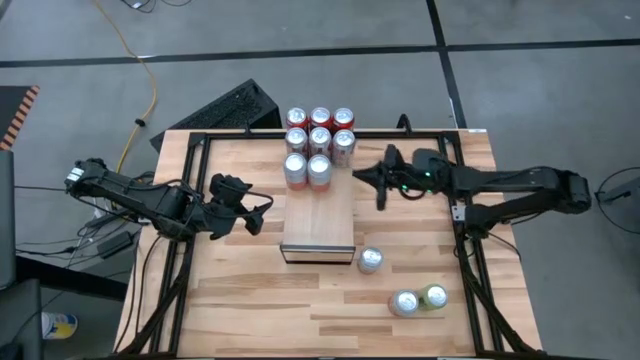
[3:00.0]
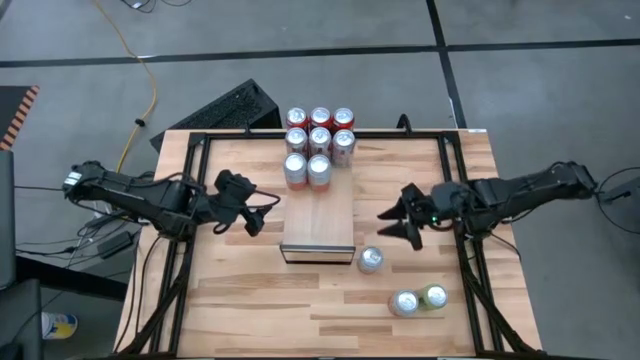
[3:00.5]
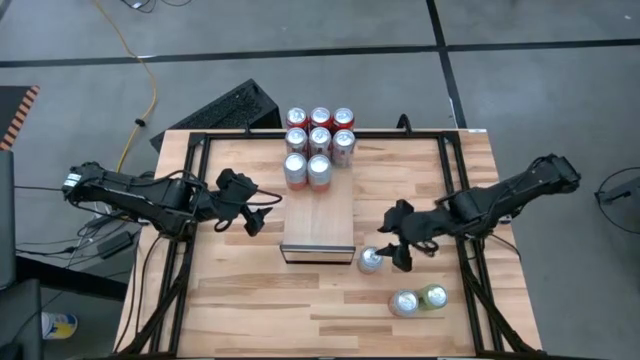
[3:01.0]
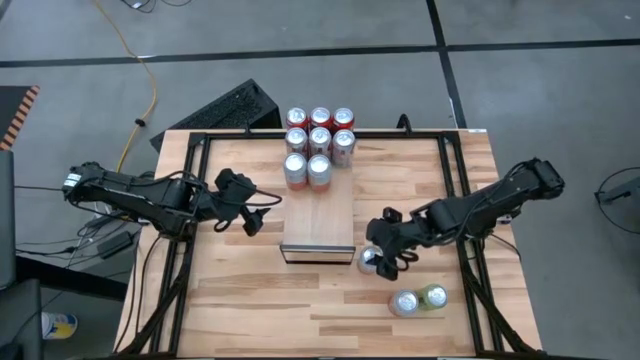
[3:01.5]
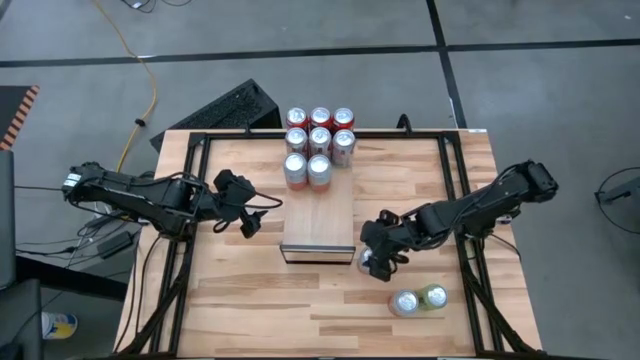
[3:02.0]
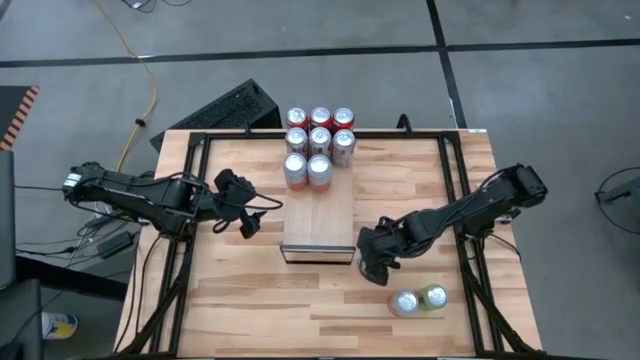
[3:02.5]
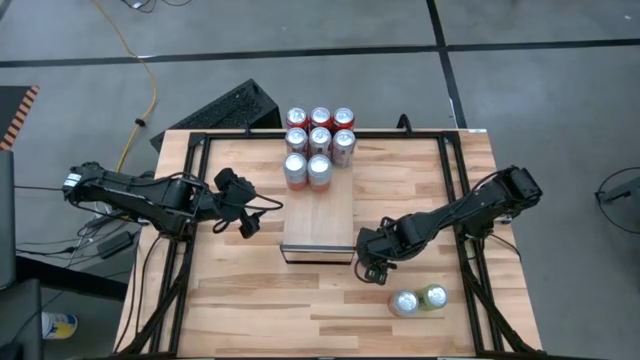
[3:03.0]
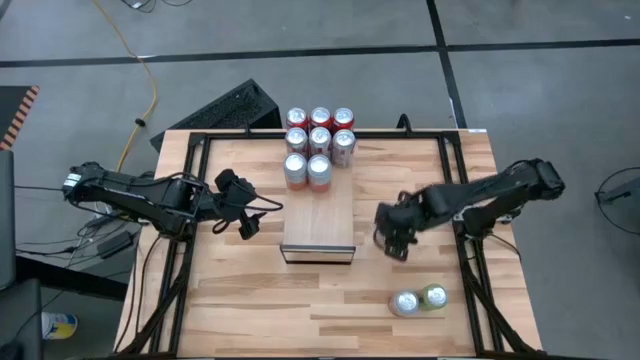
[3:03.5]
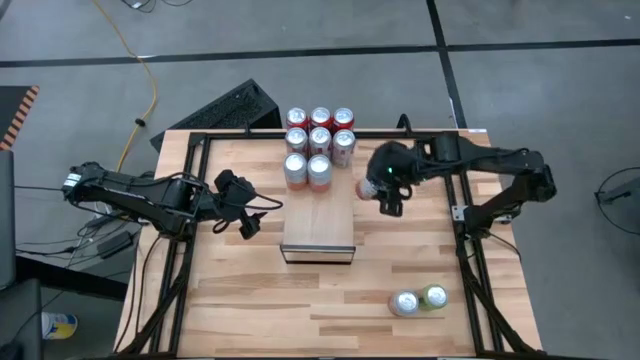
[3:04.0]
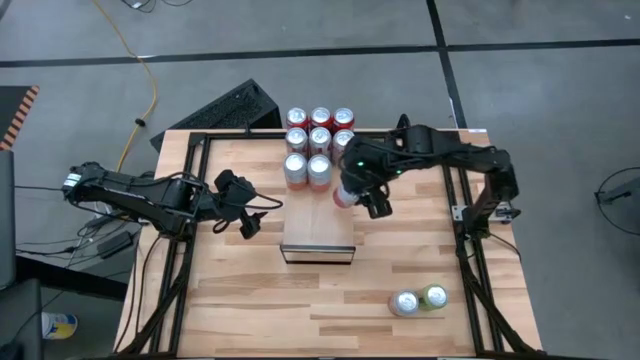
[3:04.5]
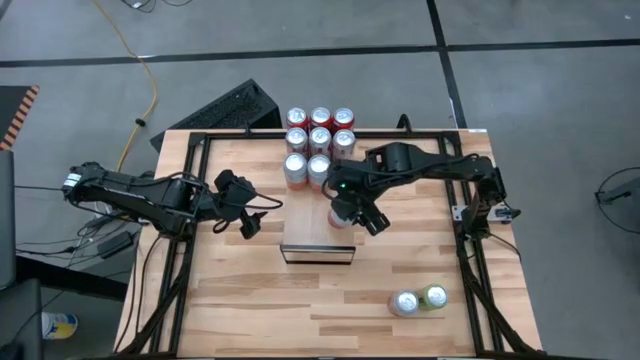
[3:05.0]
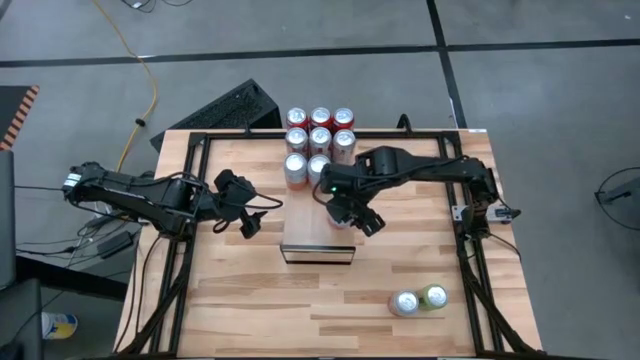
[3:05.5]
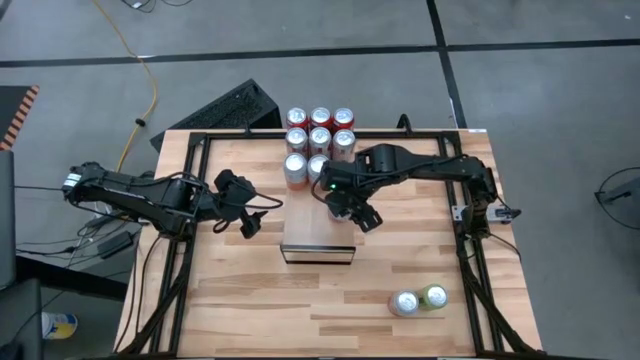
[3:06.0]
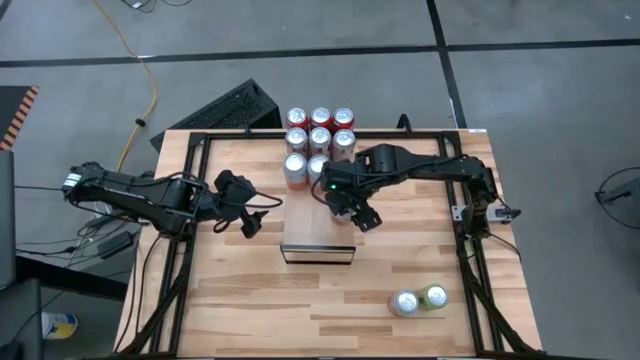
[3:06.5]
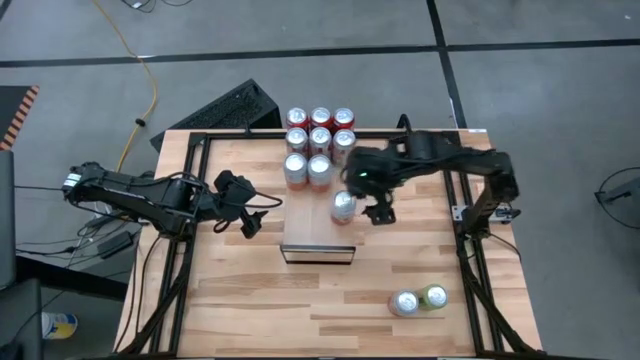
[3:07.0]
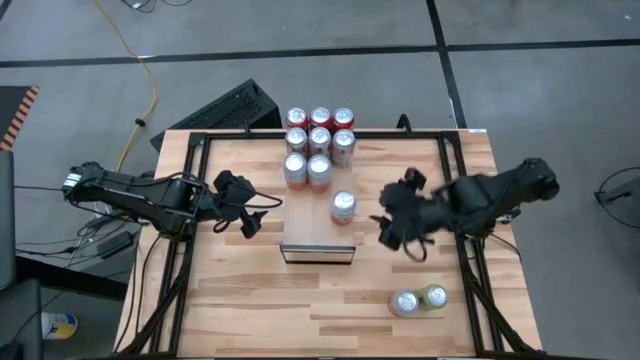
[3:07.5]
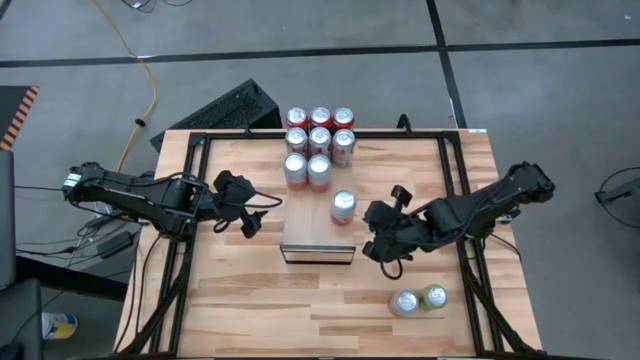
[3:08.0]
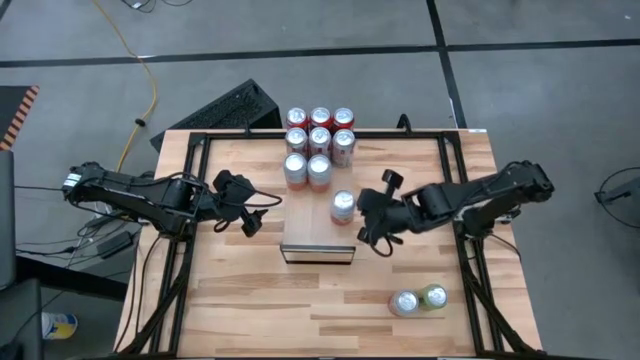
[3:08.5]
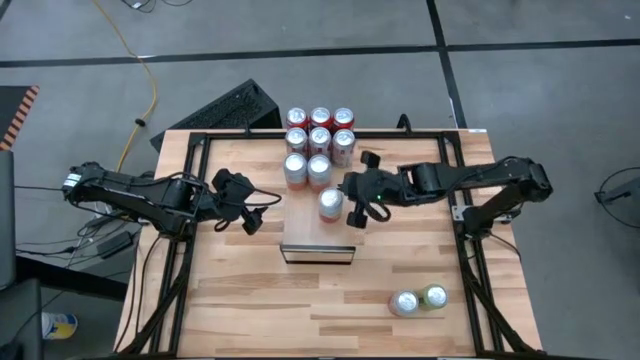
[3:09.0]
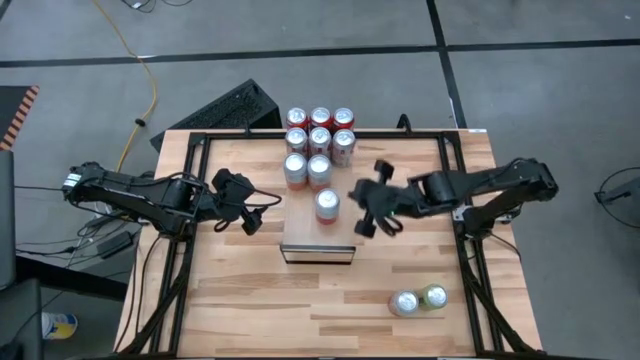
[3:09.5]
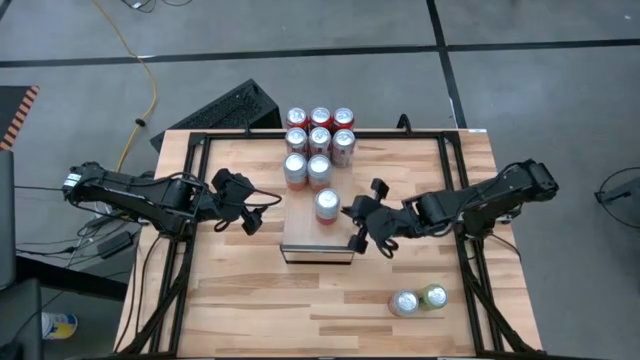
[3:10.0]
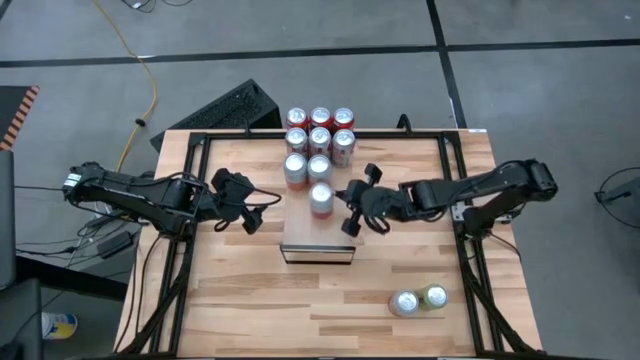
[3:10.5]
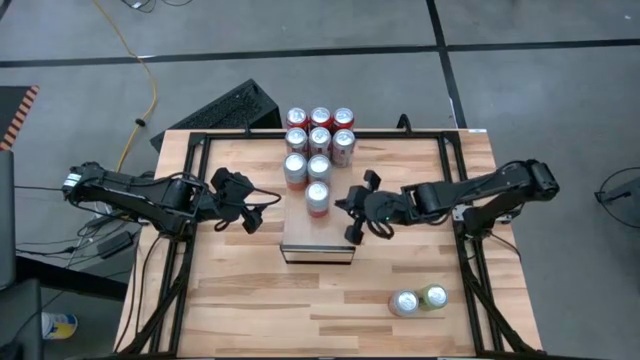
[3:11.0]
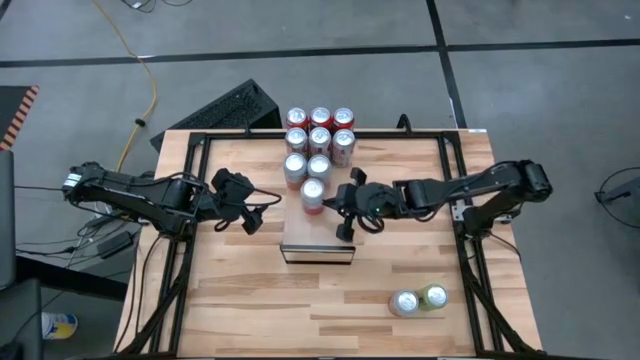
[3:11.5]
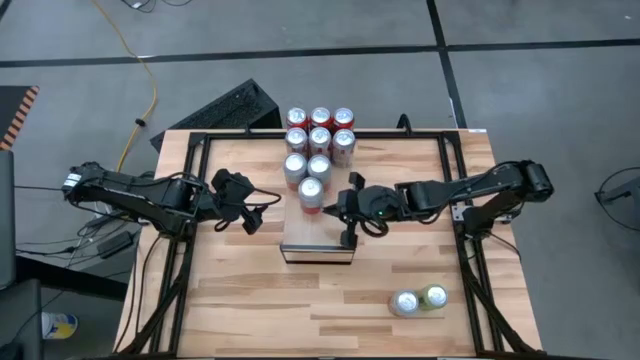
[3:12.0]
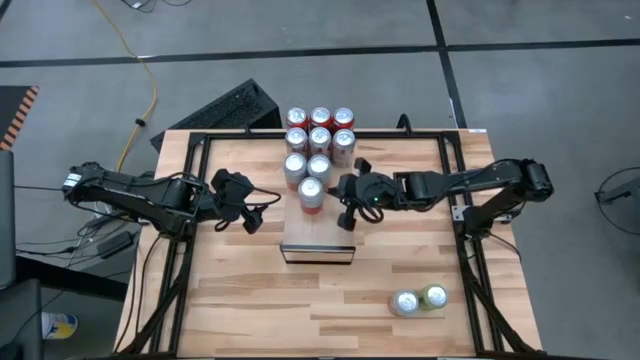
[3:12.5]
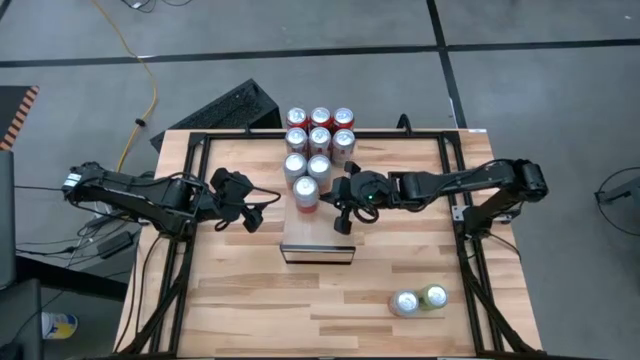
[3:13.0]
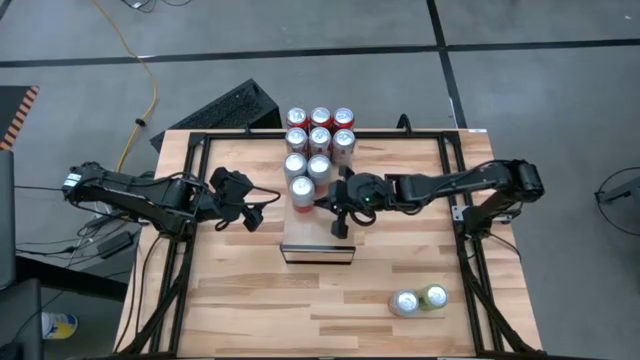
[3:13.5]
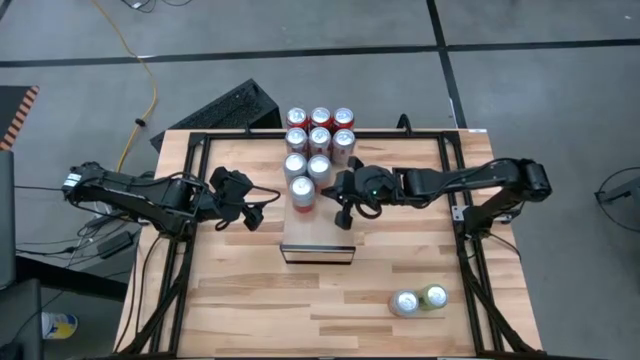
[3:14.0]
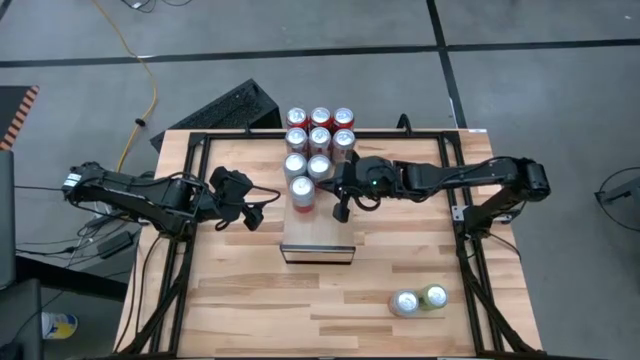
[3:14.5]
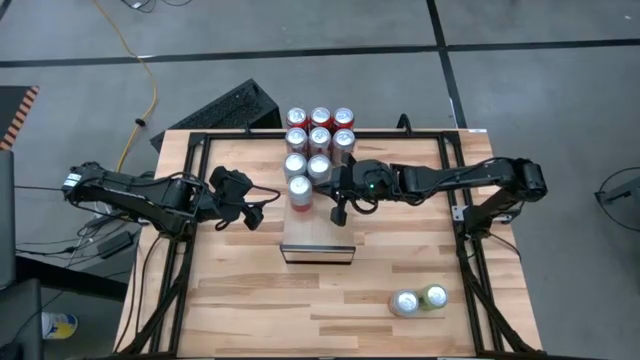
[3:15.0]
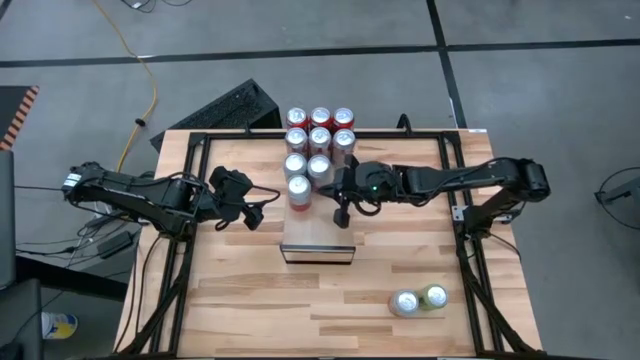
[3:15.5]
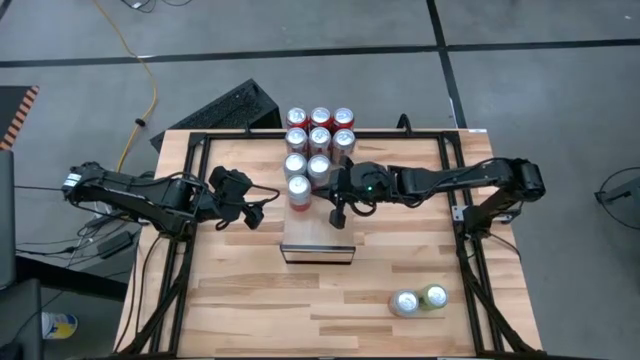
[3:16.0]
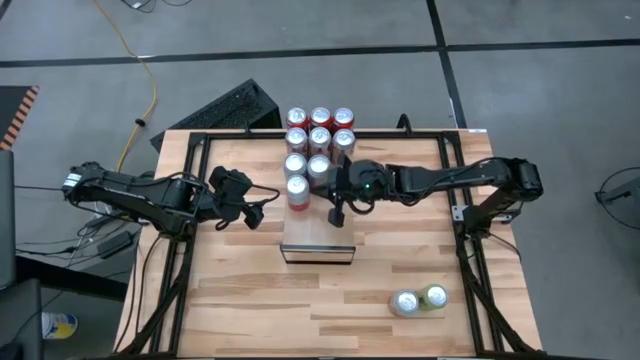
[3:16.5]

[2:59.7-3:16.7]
Task: Place canned beverage on shelf
Put the top pink-white soda can on the shelf

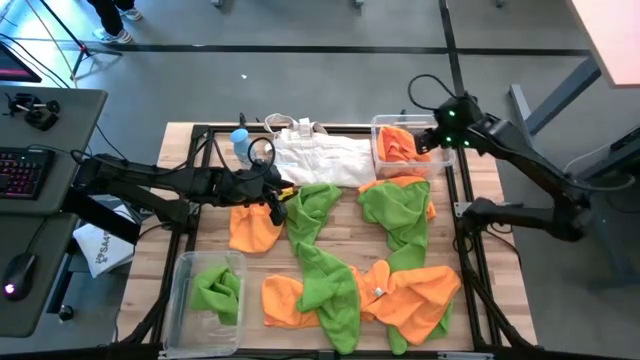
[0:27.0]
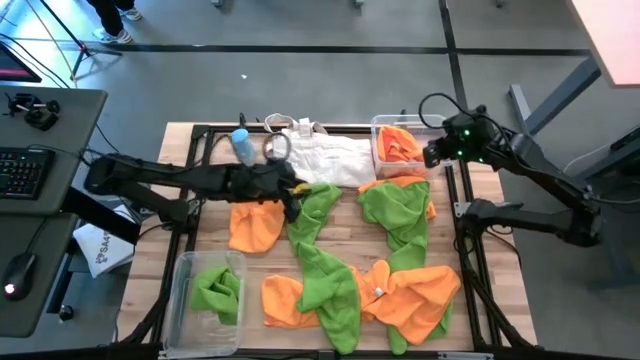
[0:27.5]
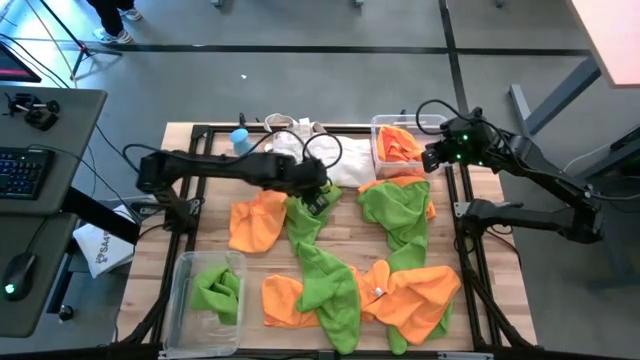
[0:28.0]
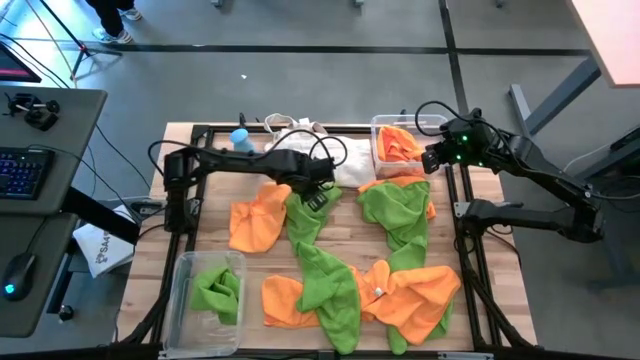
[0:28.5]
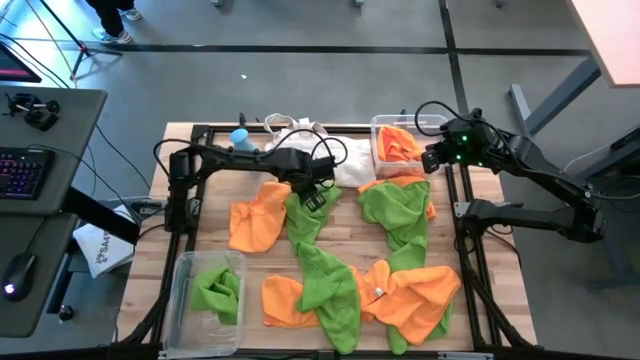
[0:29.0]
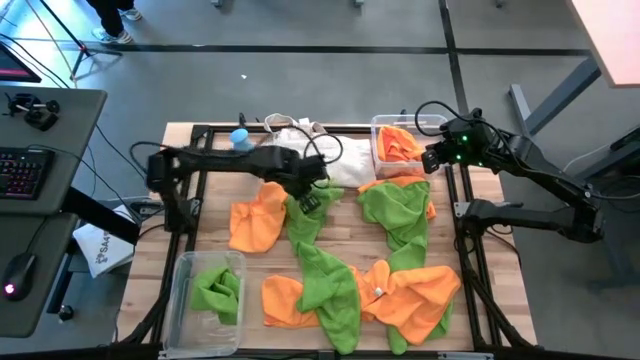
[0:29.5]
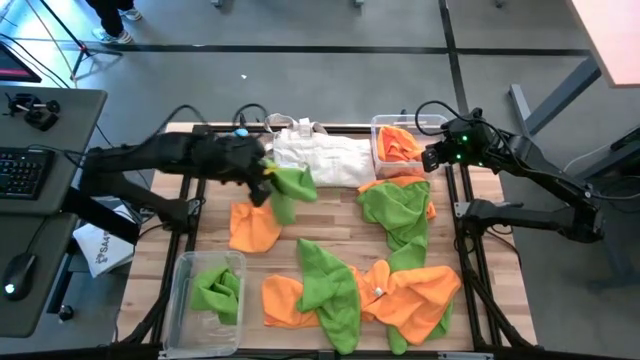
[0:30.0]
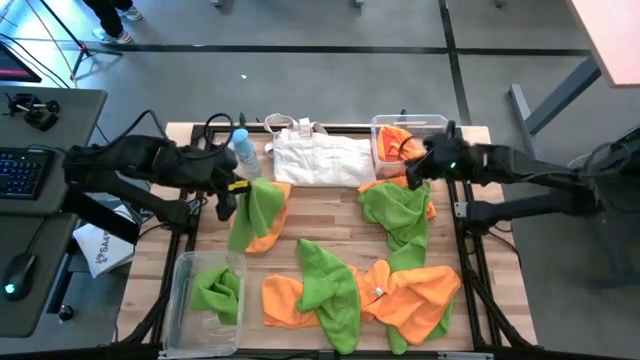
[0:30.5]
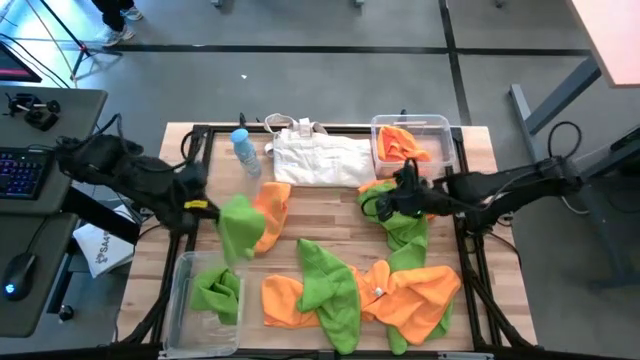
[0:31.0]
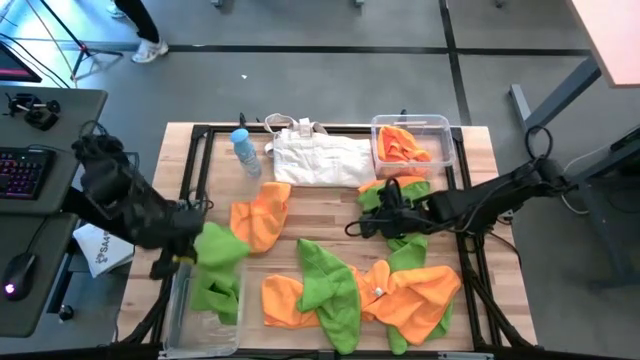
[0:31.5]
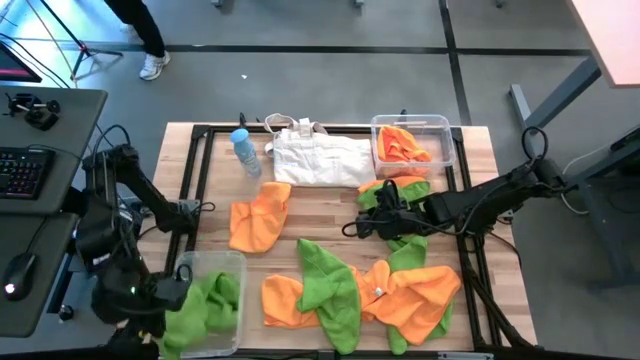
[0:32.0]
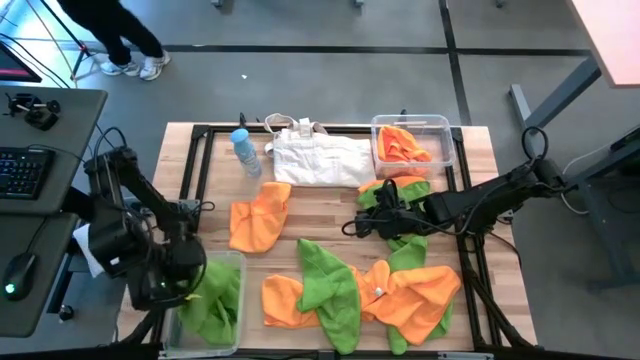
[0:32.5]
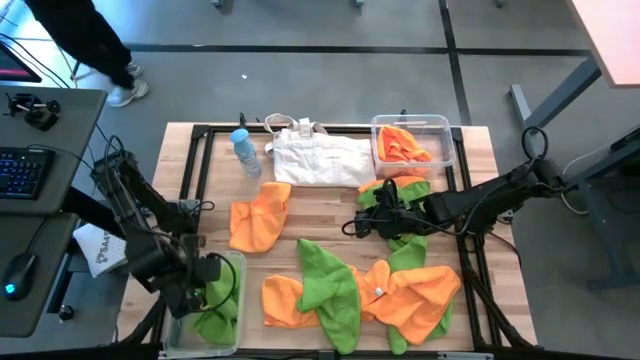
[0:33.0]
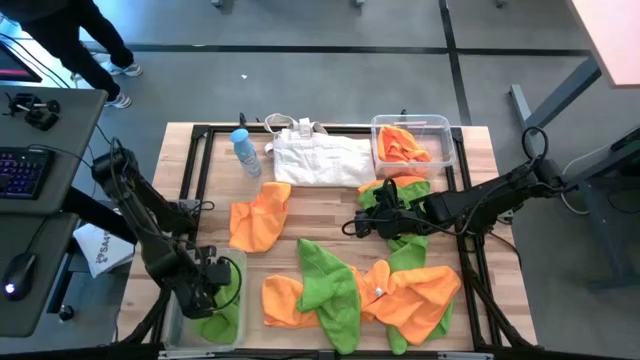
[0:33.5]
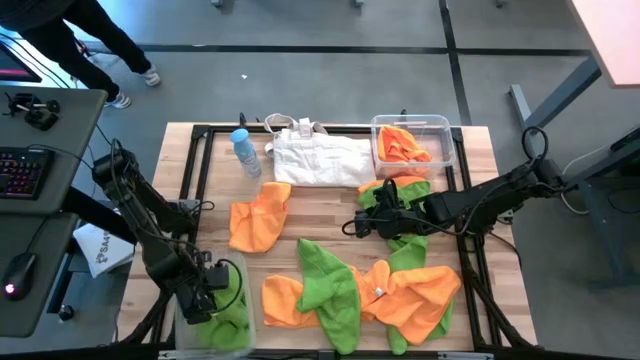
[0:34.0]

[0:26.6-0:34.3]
Task: Sort microfiber towel by color & place in baskets
Put the green microfiber cloth into the bottom transparent bin
